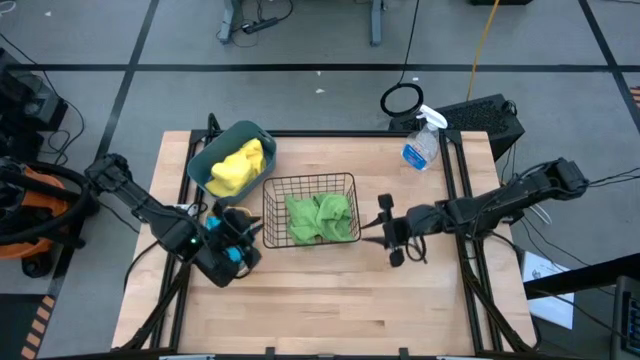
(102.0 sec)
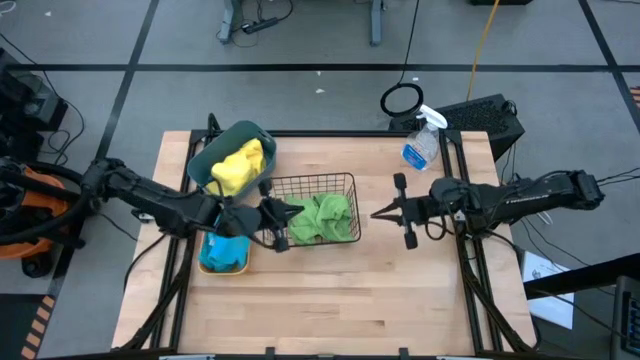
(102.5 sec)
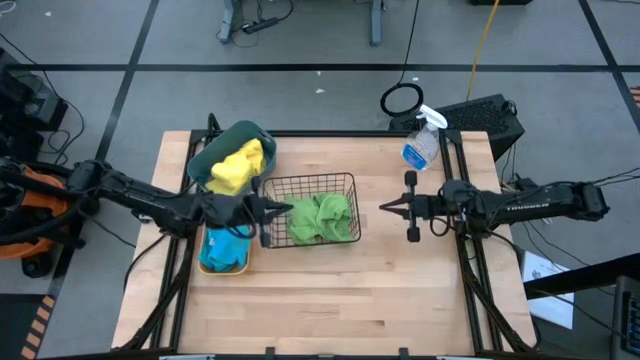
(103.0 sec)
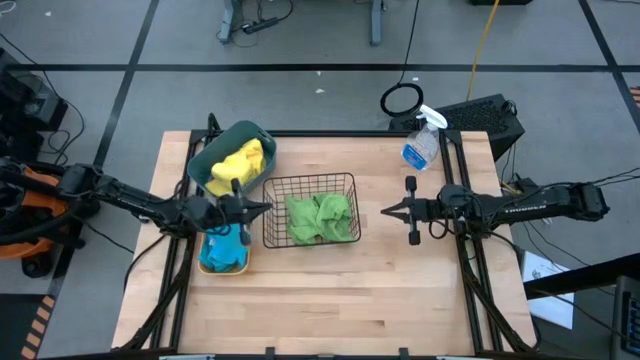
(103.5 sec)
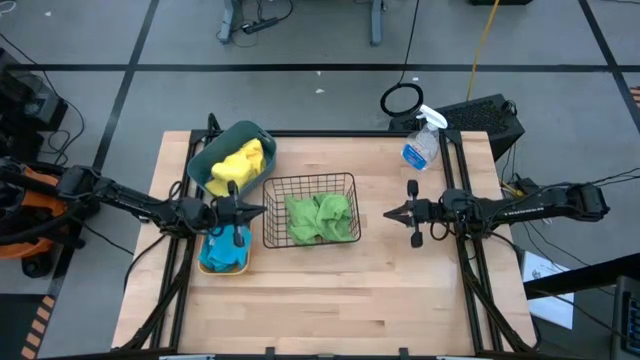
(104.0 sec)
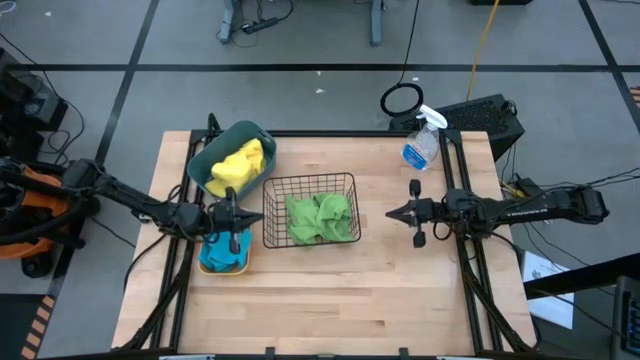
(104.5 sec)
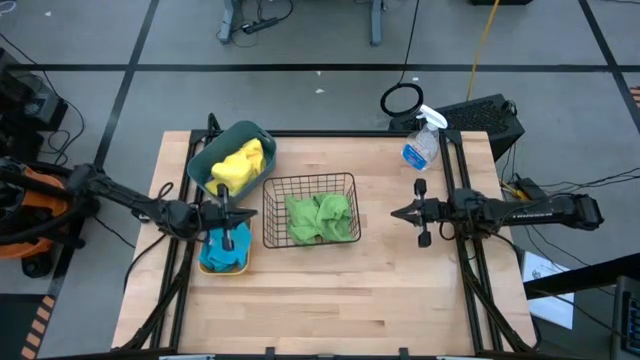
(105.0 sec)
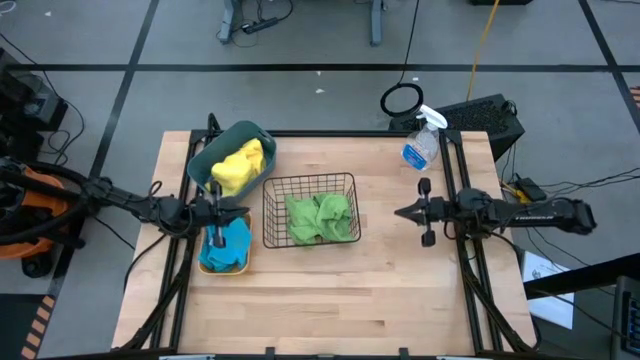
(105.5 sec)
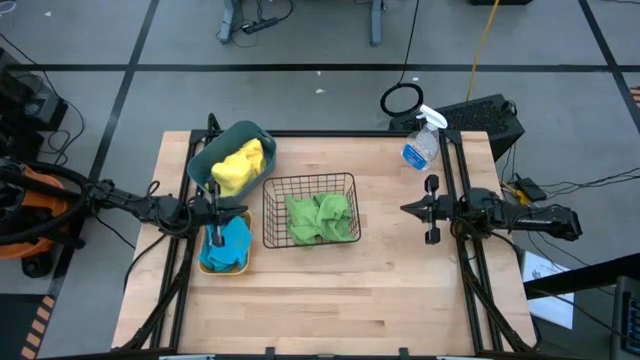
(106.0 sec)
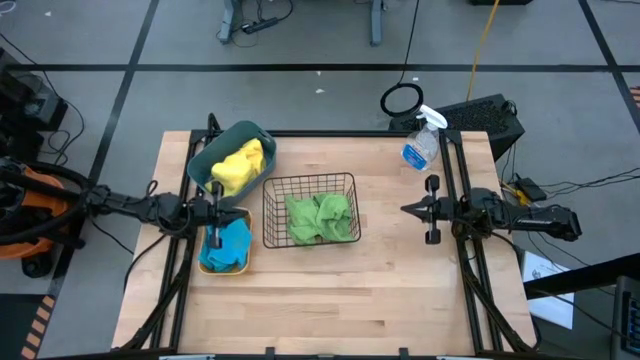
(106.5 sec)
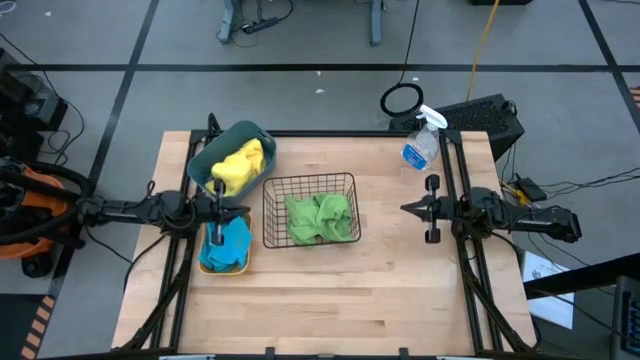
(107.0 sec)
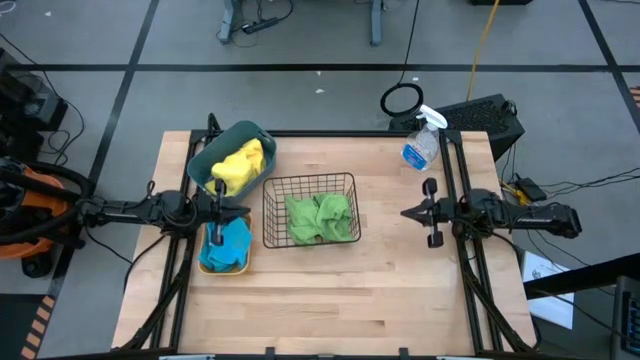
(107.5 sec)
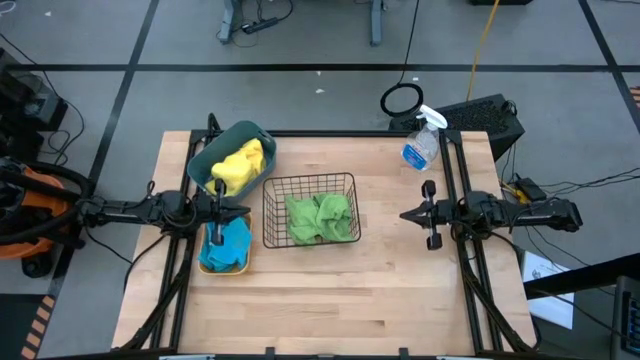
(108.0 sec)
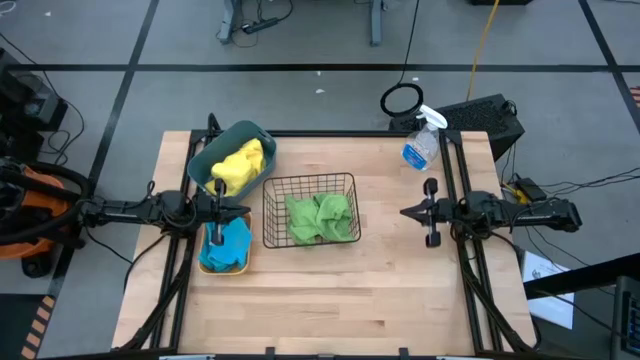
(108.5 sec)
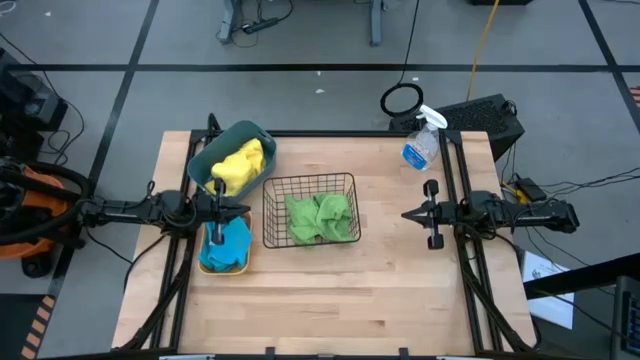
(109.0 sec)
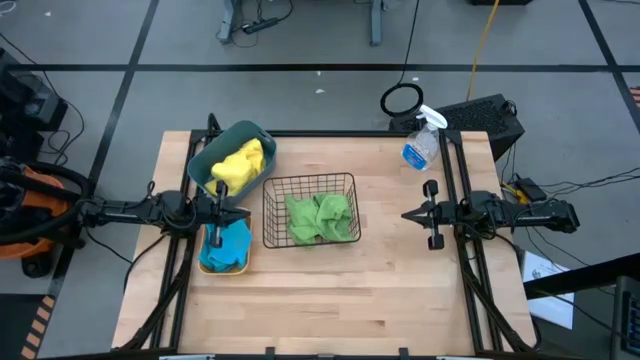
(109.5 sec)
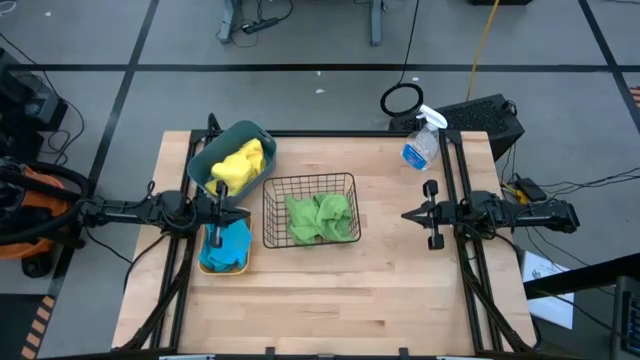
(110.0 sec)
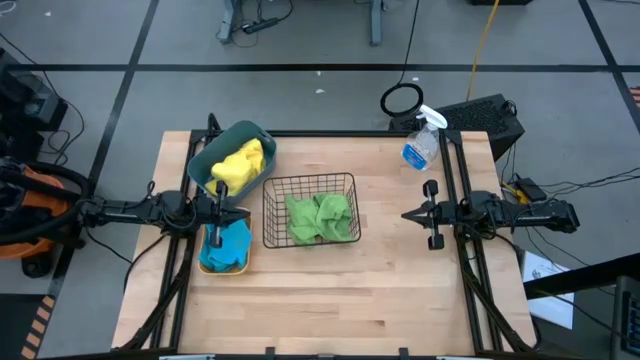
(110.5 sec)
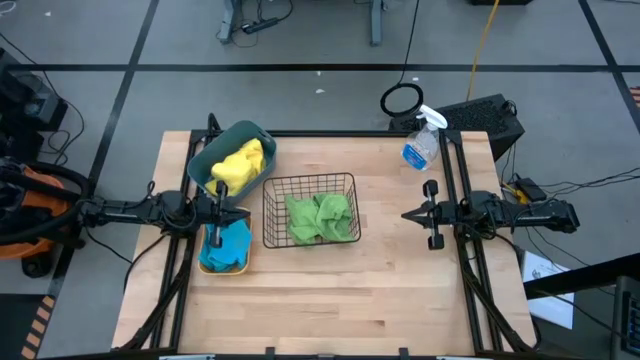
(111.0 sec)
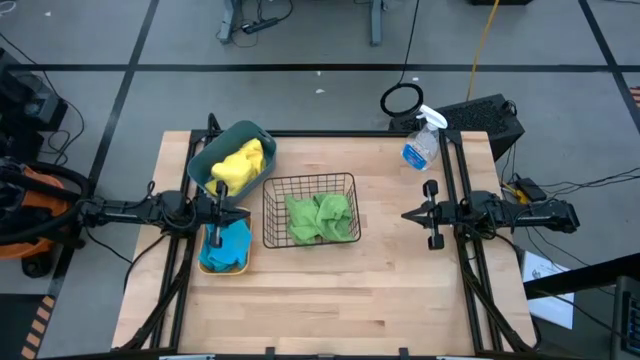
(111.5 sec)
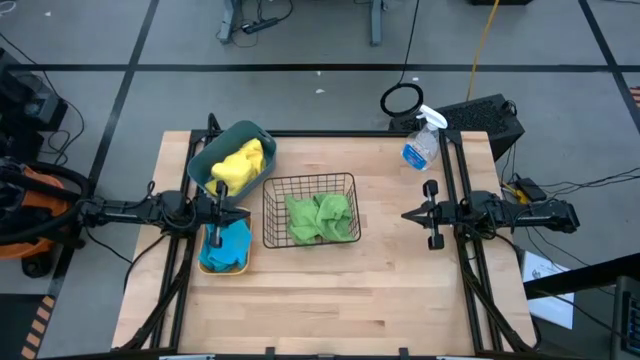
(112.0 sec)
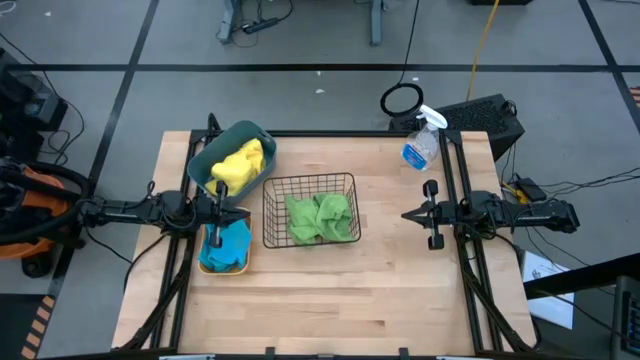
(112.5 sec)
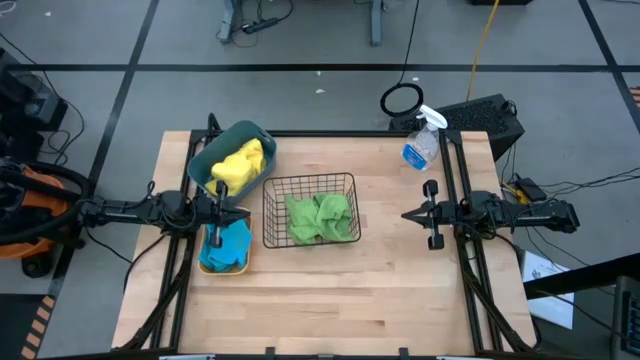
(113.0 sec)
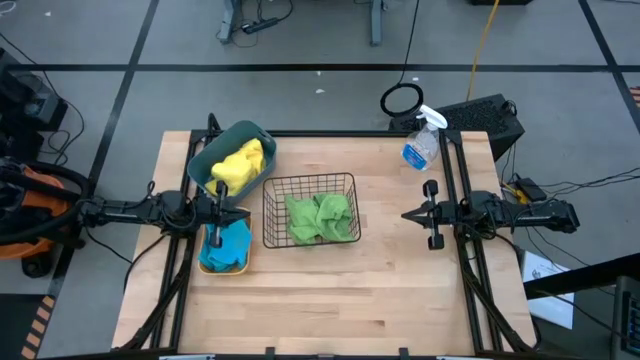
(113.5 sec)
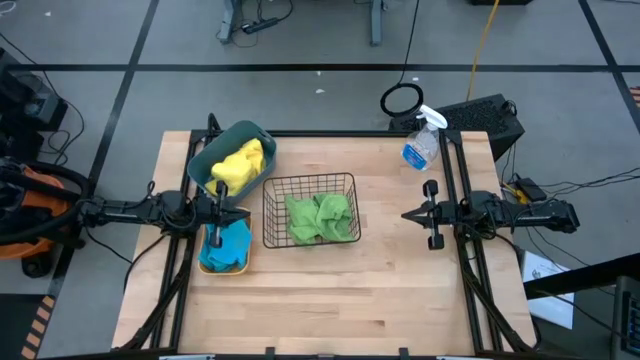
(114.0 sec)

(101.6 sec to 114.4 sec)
Task: Sort microfiber towel by color & place in baskets
Return to Home Position

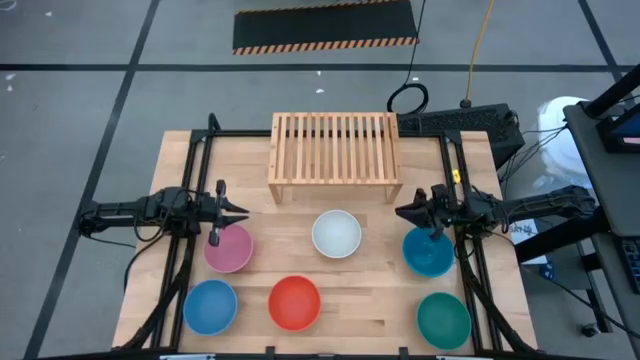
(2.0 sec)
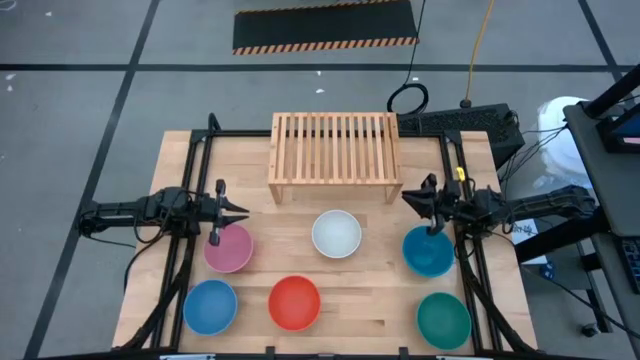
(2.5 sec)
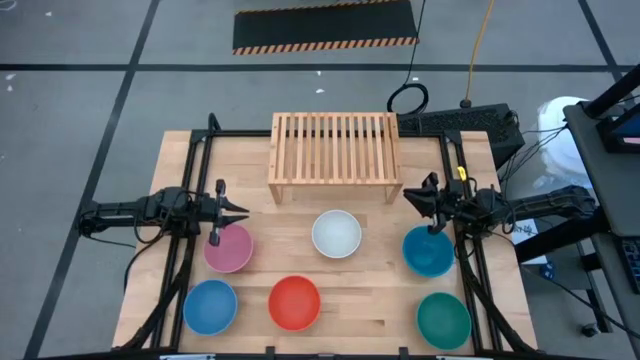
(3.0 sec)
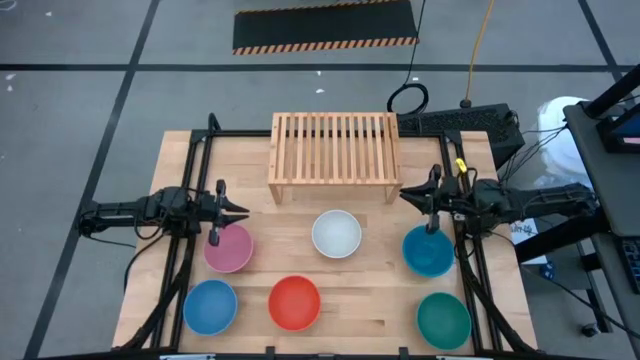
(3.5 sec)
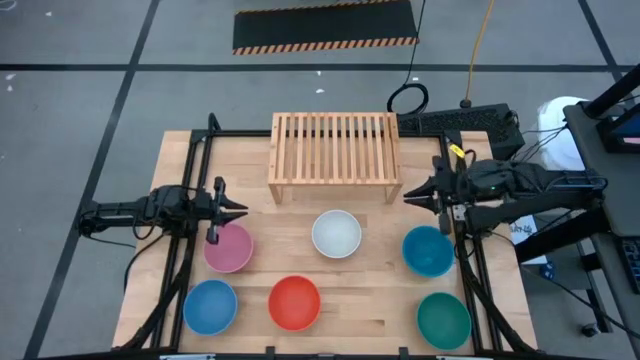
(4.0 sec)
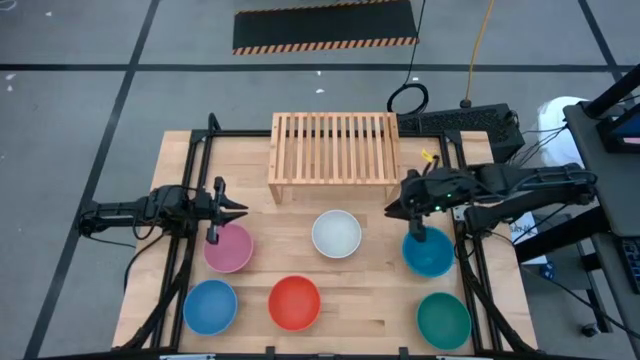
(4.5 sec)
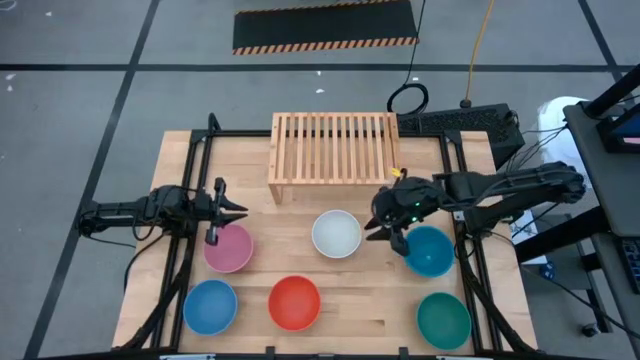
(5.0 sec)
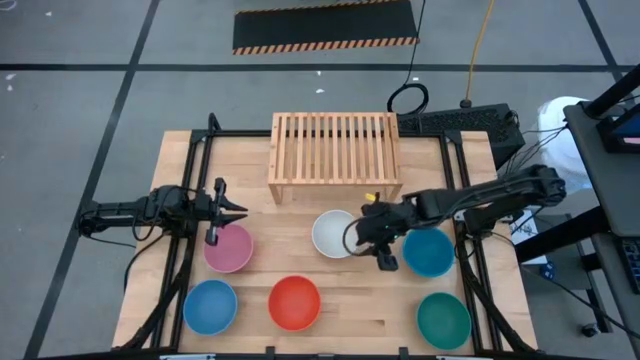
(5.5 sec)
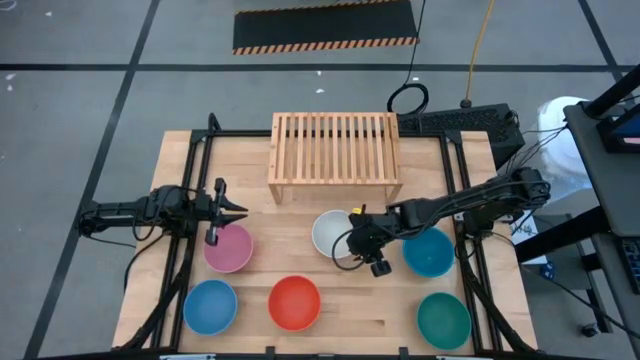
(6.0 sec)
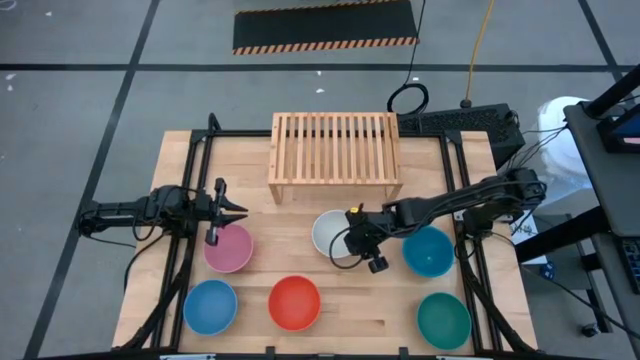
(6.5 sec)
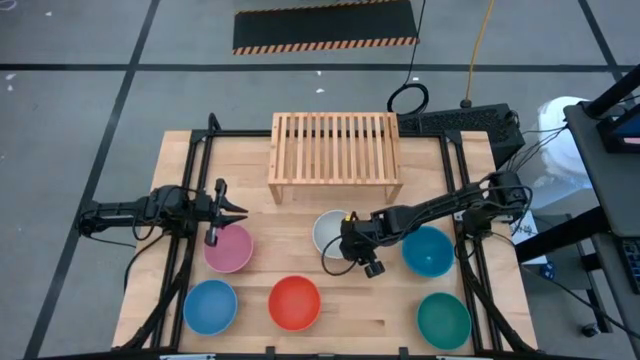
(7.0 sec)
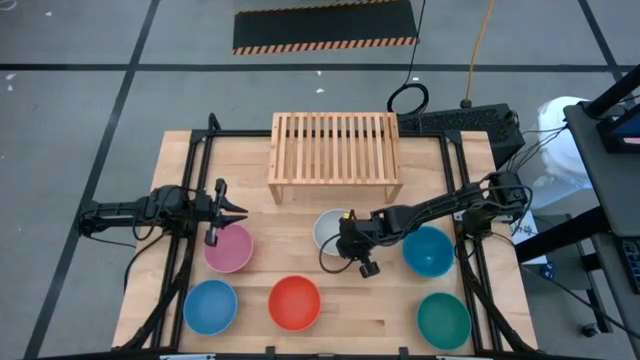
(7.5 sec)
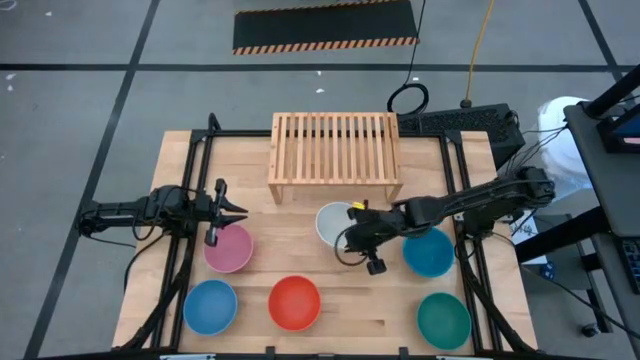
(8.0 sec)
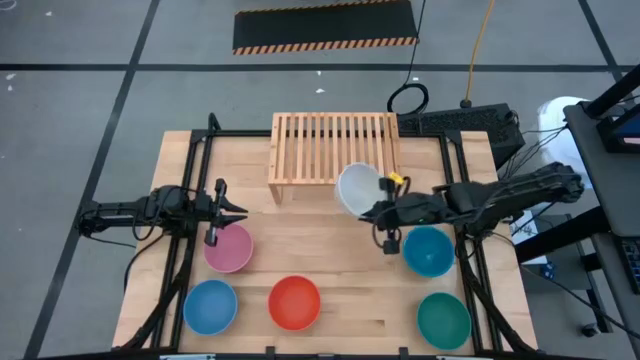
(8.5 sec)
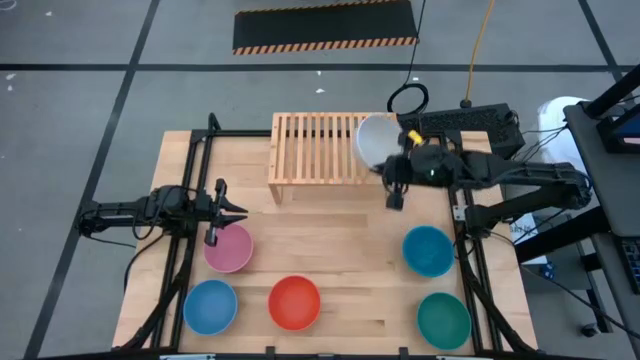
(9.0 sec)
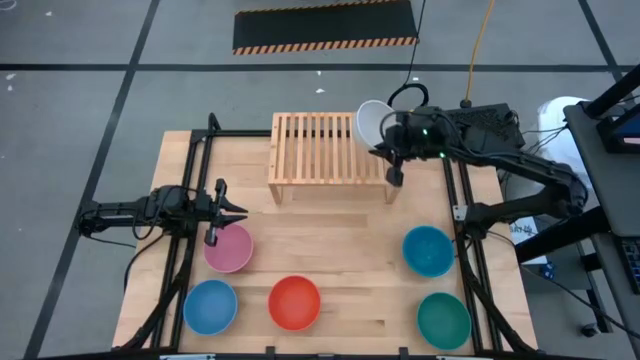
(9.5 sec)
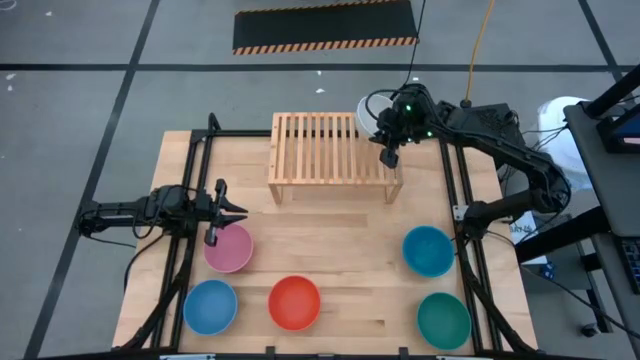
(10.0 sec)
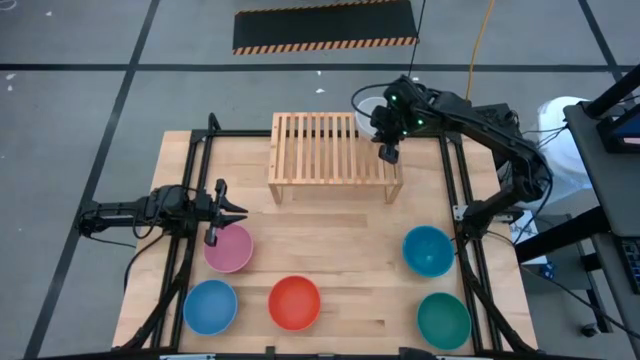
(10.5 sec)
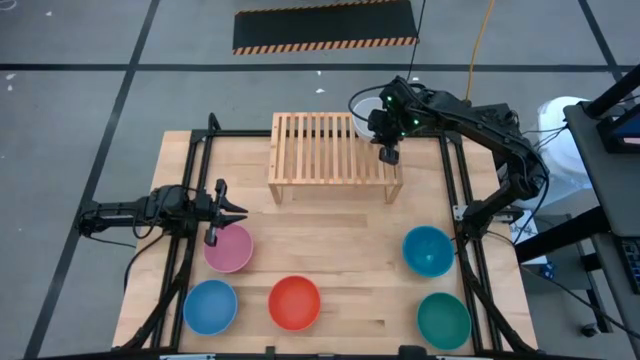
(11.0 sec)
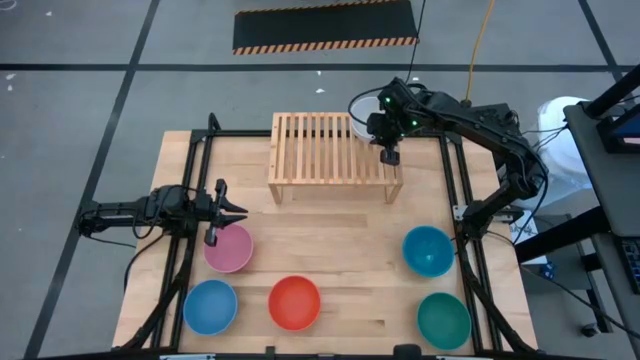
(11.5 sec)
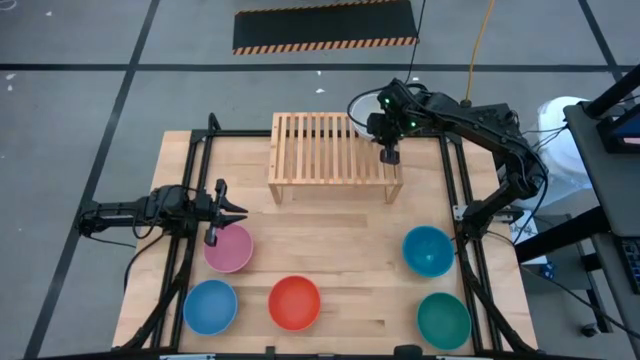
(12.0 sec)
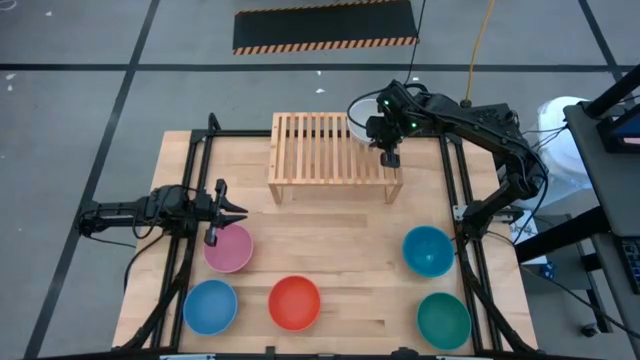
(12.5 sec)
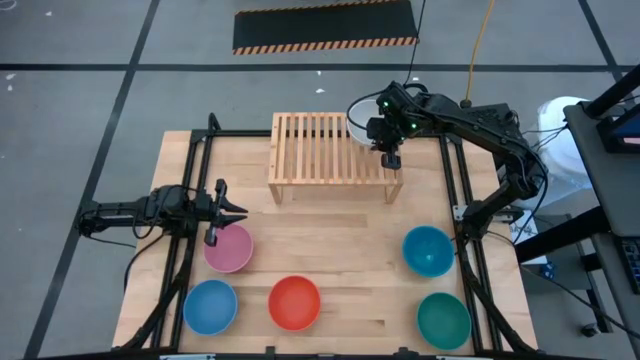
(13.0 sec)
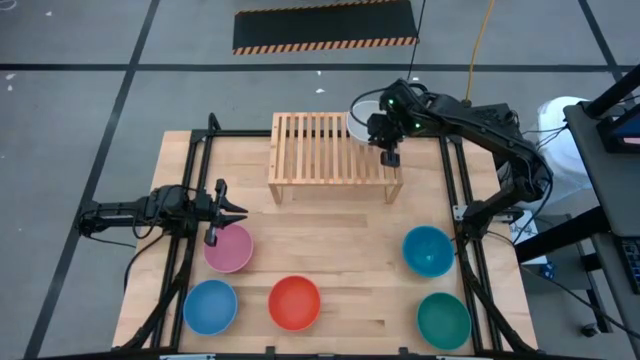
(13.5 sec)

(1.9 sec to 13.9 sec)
Task: Place and stack bowls onto a shelf
Put the white bowl on the shelf
